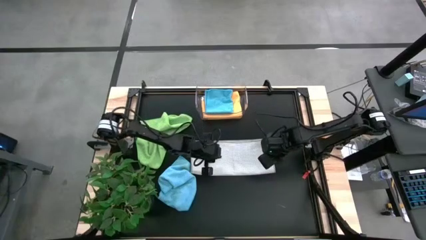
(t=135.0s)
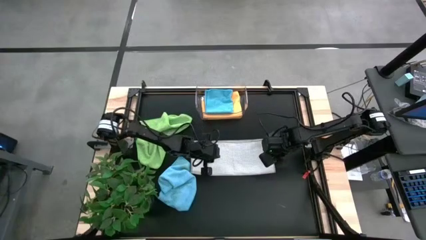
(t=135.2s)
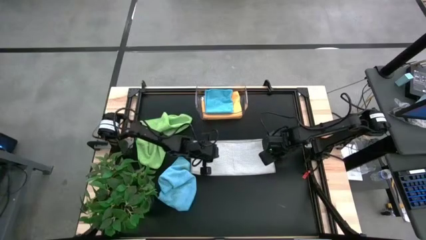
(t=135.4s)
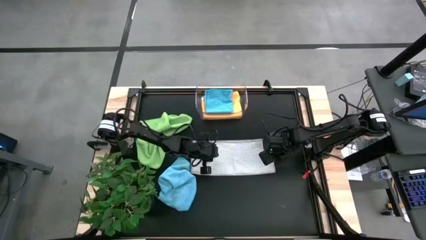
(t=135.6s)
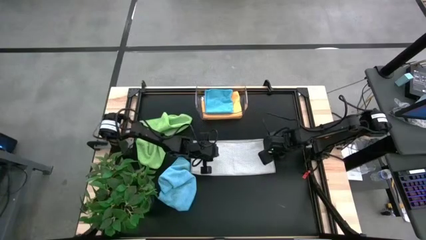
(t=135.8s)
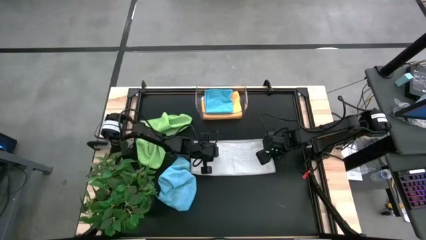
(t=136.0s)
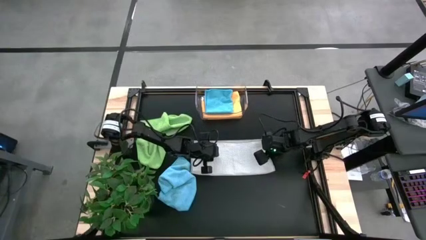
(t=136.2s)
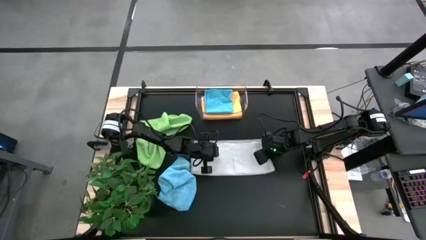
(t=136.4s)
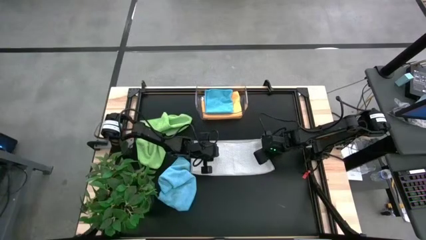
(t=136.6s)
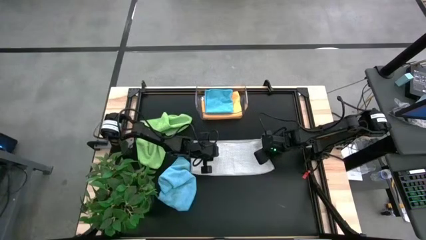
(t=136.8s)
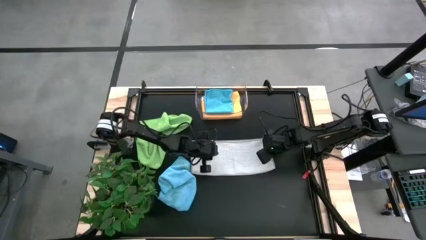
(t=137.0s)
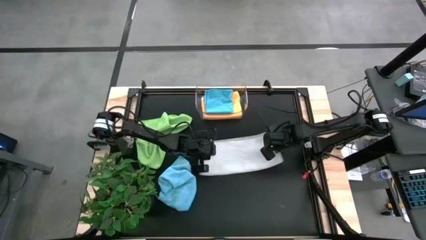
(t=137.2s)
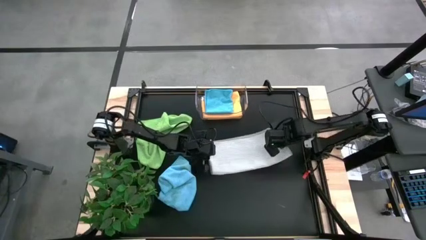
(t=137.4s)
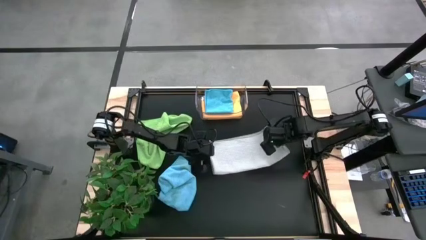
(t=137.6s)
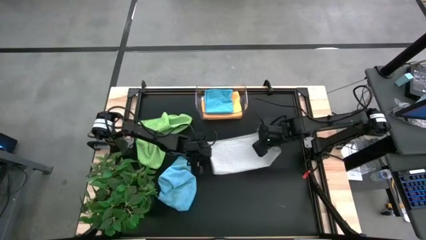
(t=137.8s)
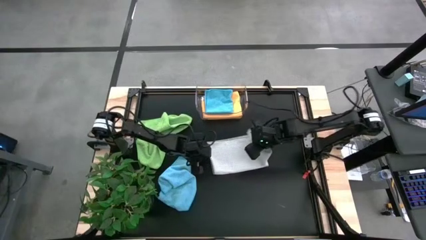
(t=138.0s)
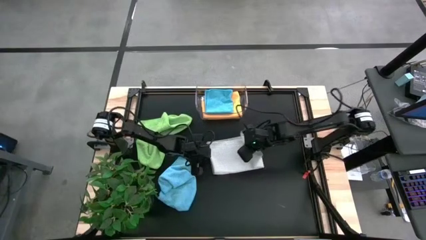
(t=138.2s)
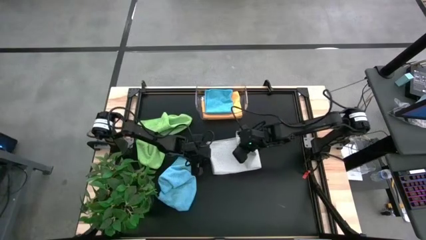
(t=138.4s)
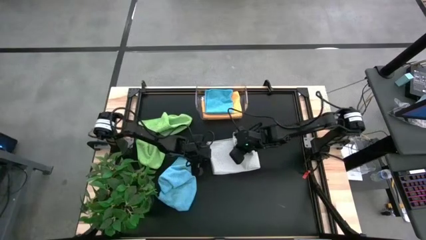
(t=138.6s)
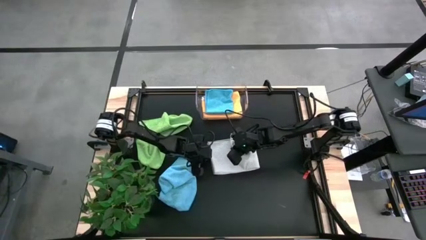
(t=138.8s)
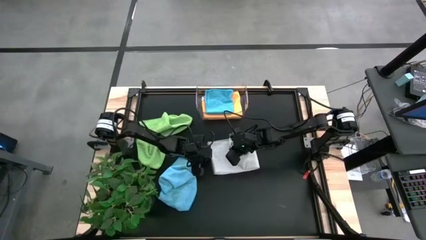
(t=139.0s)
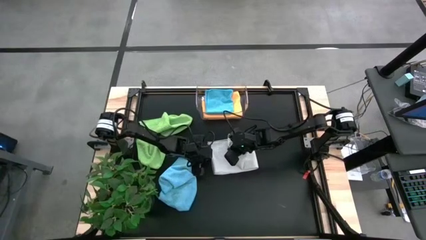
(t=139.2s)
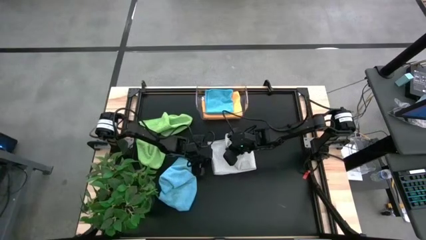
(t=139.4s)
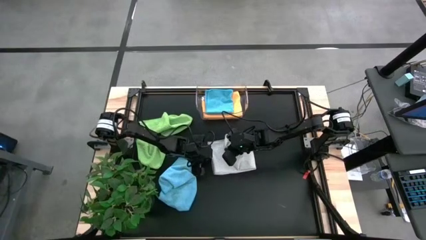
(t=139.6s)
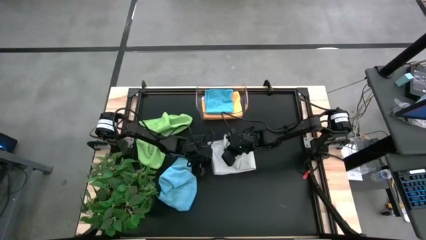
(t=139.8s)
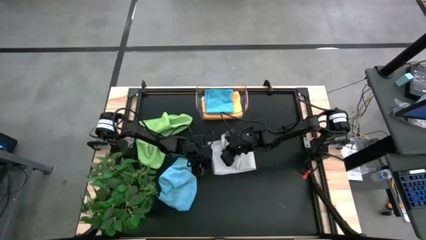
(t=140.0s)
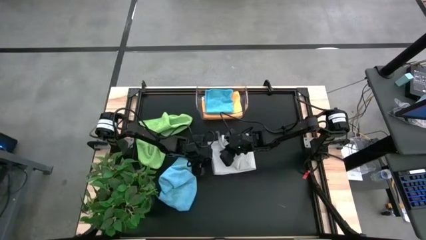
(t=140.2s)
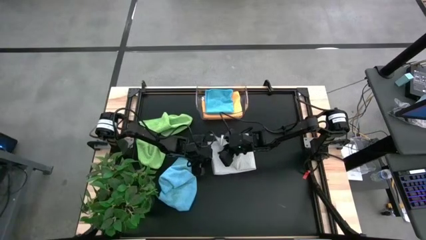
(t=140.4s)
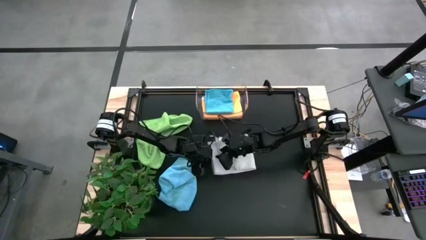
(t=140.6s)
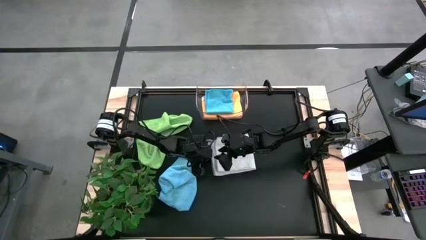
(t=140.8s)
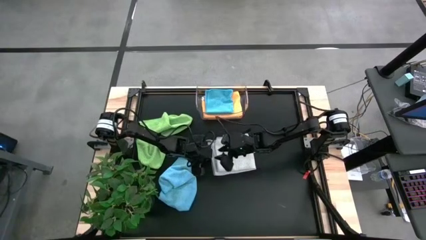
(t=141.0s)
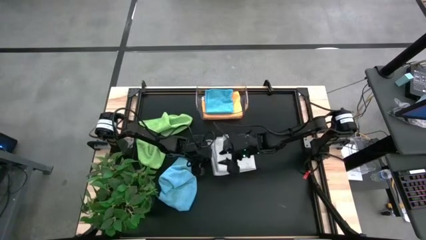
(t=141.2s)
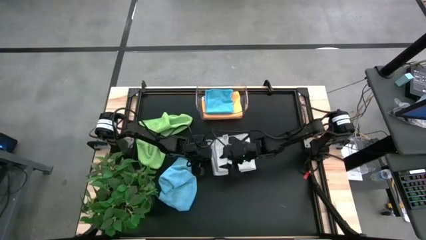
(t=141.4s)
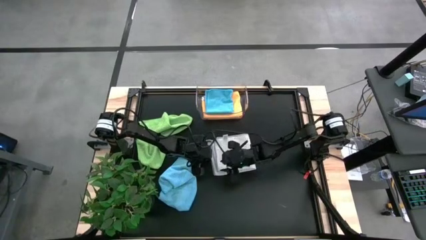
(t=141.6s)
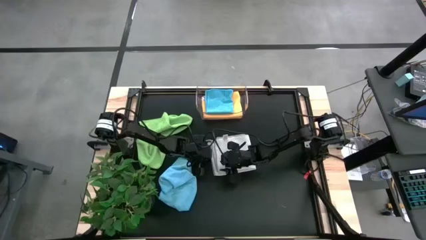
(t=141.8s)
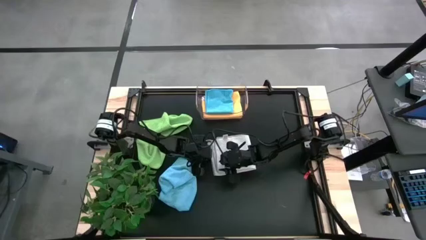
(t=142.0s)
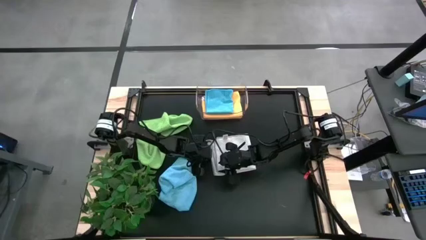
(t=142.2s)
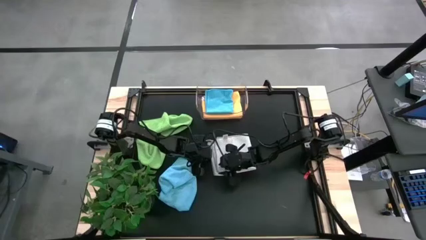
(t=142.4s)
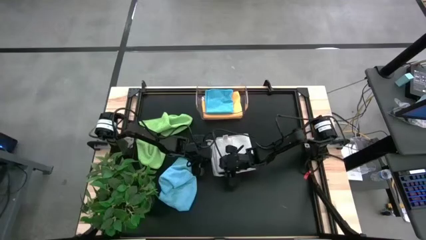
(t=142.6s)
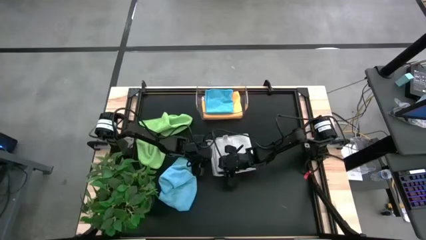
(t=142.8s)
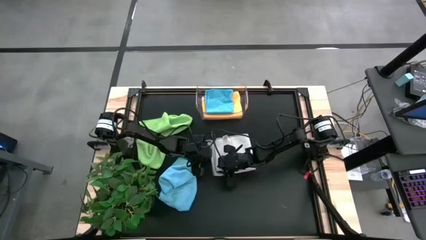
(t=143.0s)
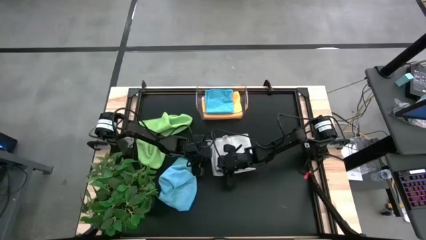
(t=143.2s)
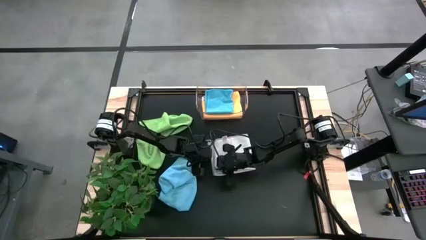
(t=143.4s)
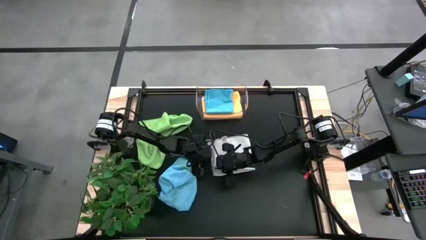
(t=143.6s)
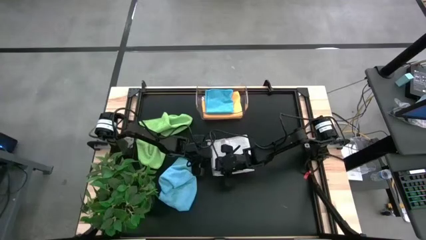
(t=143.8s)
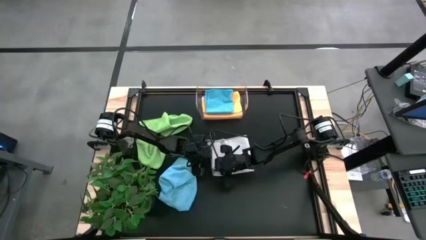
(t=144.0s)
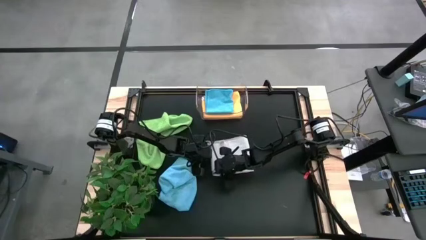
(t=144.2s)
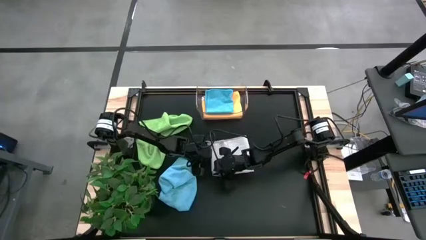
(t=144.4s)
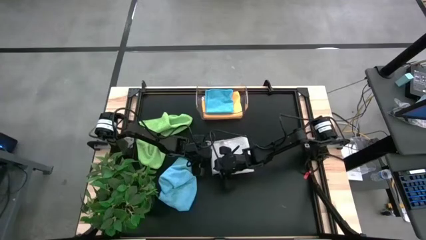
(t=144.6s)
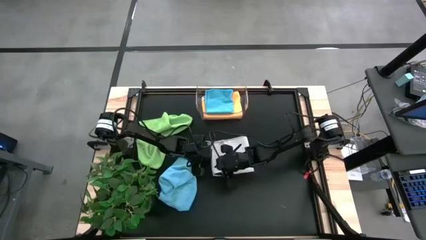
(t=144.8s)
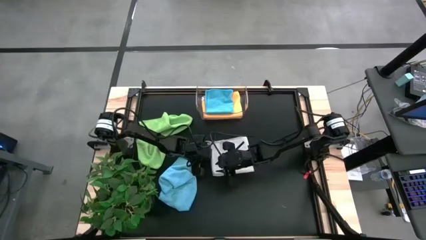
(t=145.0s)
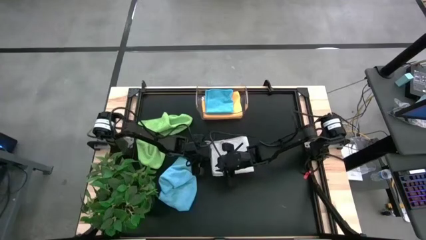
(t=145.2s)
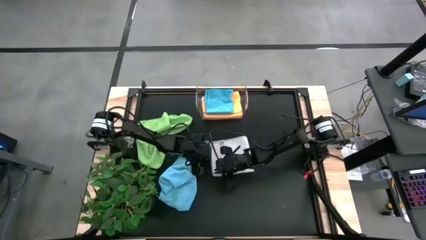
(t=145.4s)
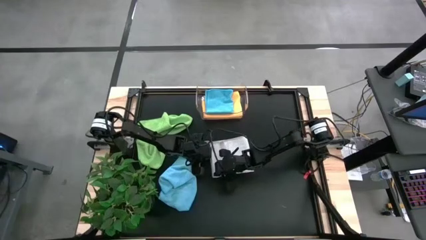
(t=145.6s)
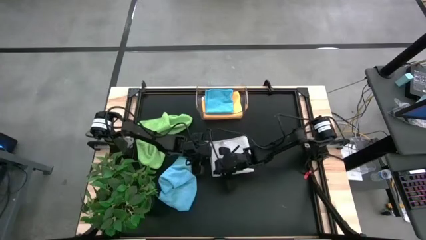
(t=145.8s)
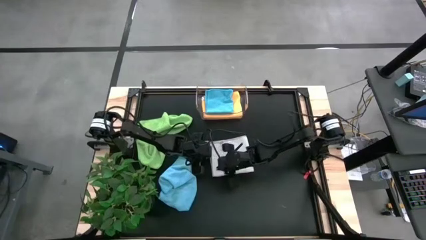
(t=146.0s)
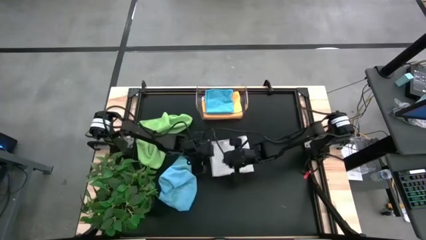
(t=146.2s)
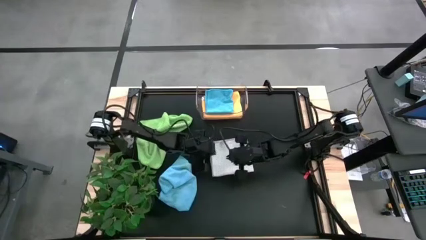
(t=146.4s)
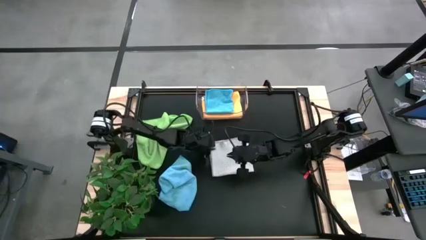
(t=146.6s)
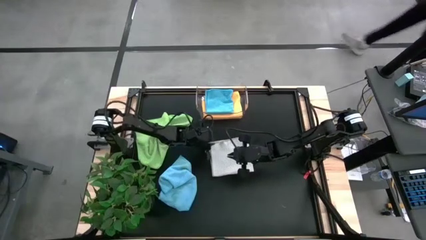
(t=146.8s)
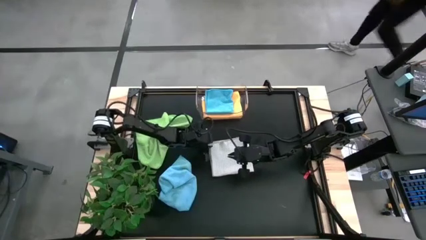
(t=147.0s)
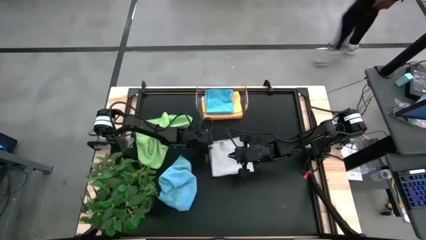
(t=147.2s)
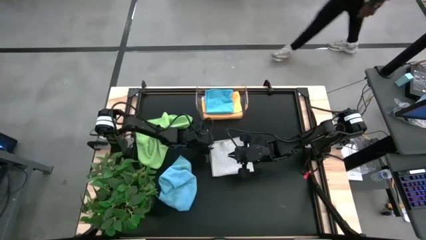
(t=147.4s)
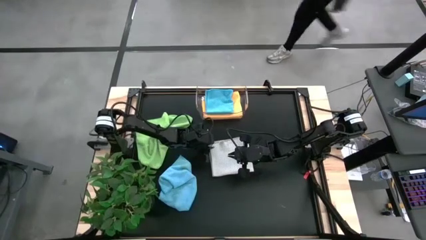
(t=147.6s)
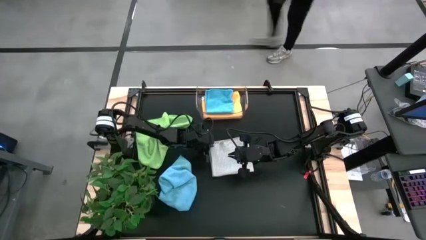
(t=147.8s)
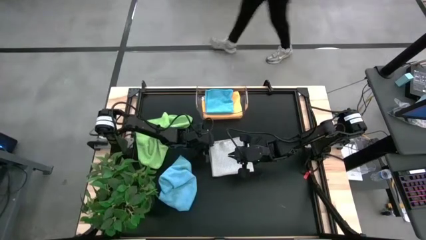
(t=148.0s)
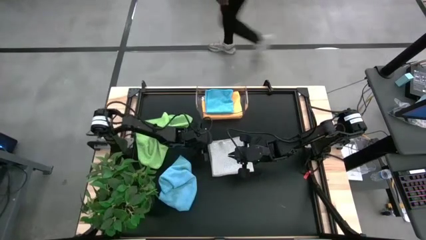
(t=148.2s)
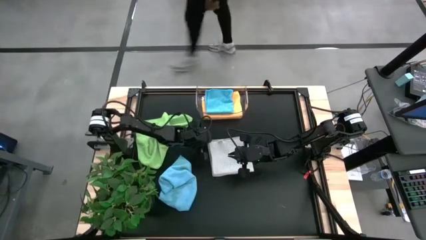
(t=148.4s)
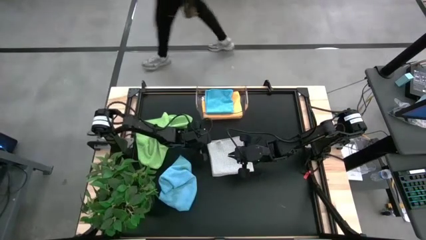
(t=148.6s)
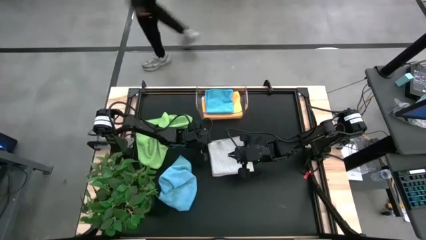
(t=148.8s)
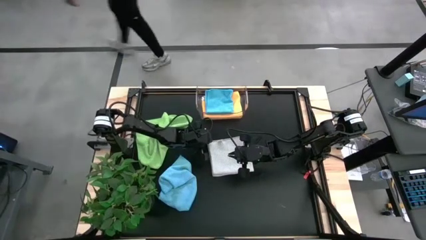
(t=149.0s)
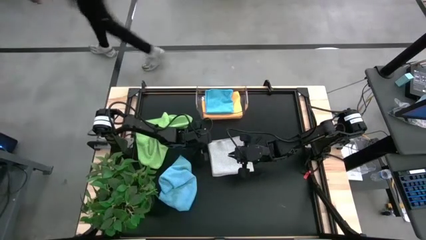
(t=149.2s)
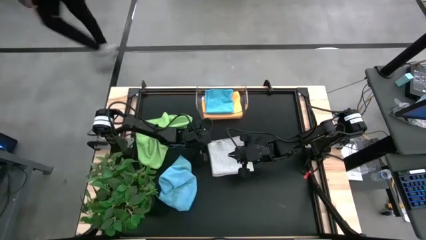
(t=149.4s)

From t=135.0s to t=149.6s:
Task: Fold microfiber towels
Fold the gray microfiber cloth

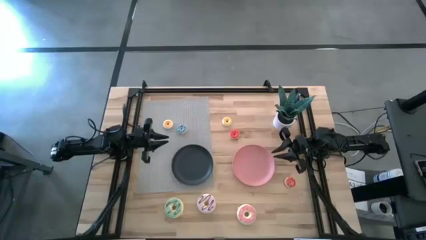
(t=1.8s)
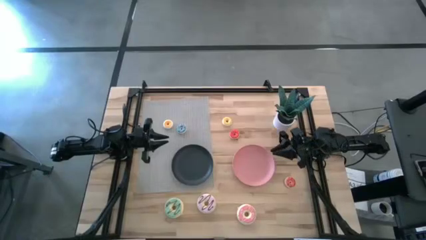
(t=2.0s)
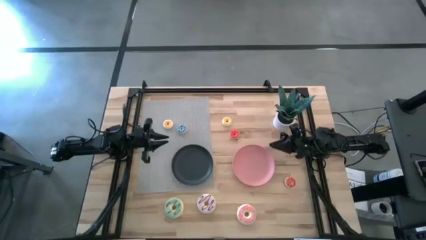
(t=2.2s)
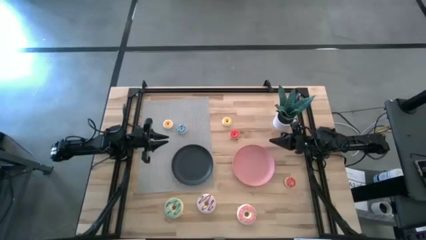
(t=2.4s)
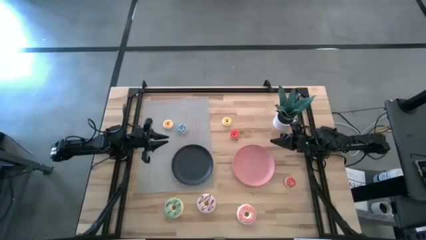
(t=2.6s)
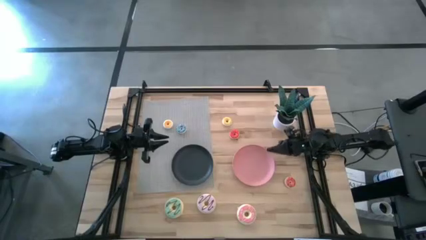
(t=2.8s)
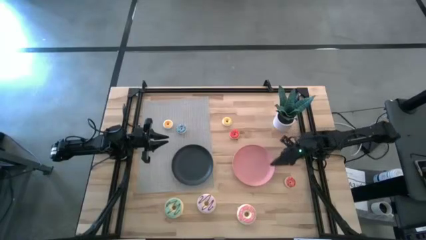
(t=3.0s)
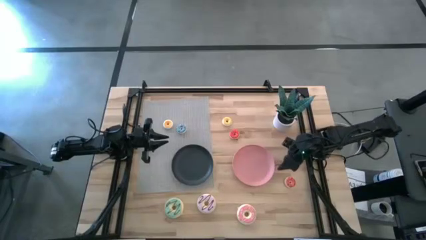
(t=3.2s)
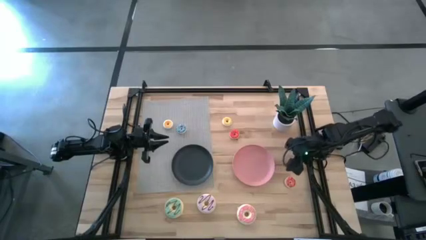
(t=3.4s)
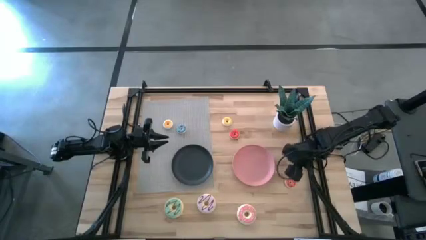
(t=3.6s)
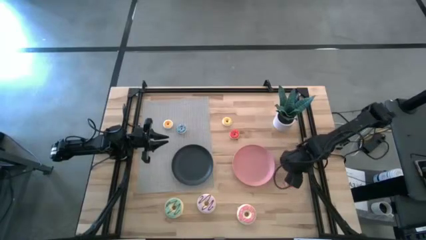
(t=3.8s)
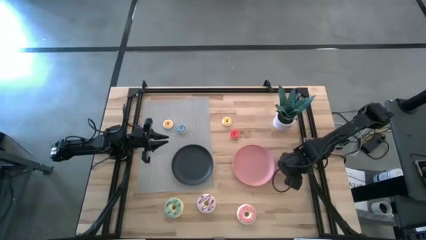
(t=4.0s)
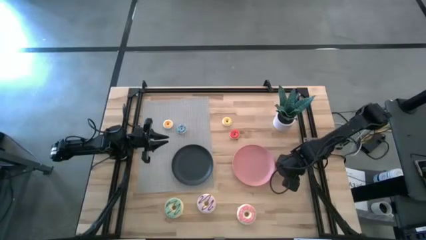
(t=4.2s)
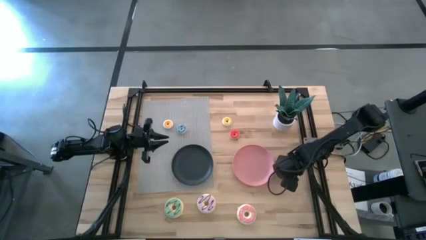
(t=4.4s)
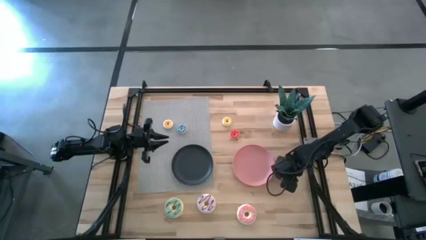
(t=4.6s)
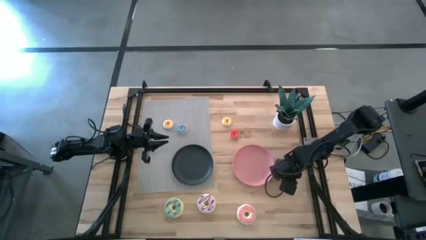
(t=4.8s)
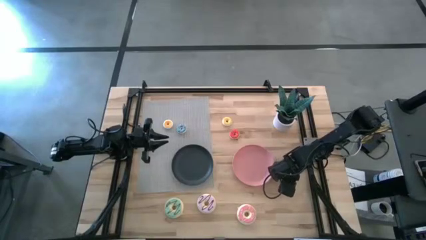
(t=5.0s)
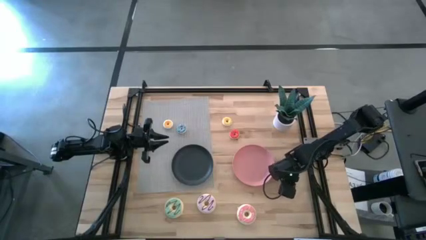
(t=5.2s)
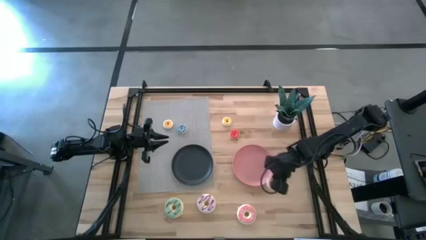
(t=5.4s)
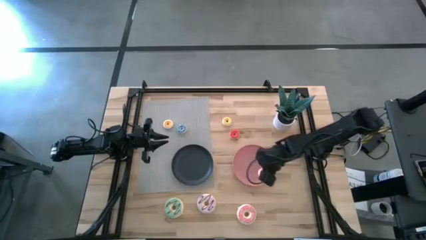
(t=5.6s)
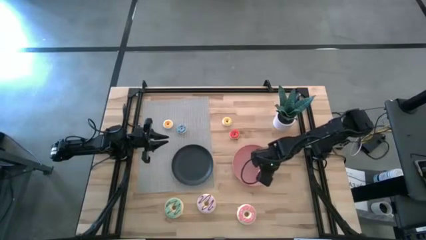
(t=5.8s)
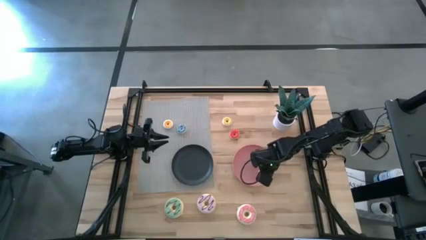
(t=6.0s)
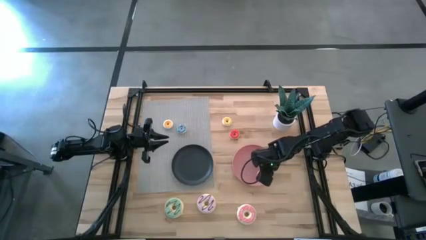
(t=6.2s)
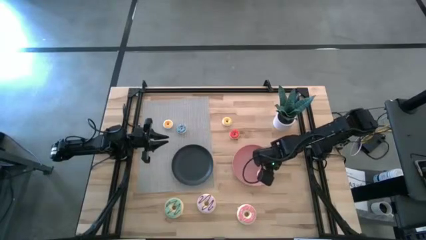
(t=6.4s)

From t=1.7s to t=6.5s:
Task: Pick & Place donuts
Put the small orange donut onto the pink plate
